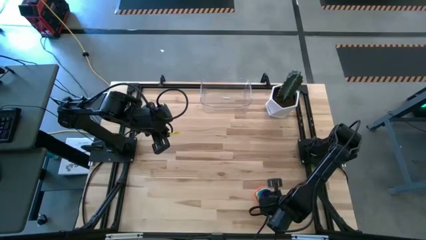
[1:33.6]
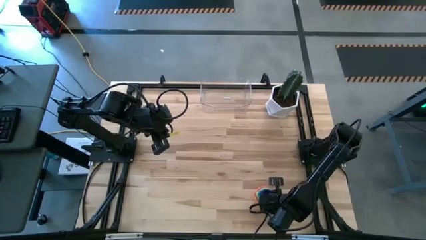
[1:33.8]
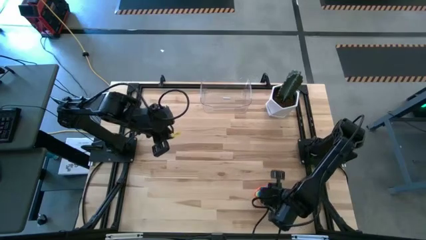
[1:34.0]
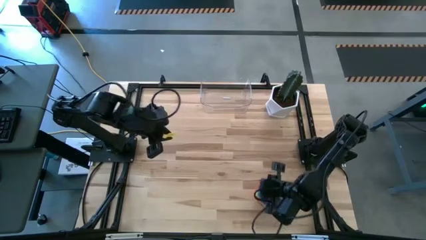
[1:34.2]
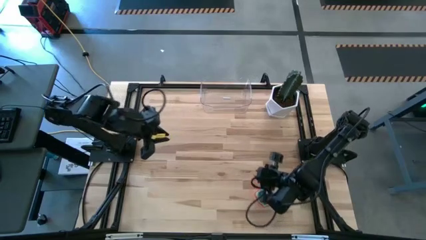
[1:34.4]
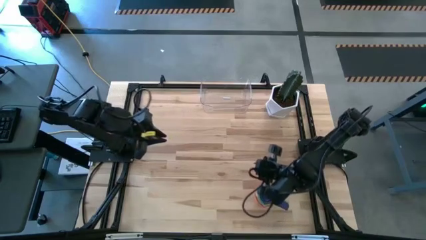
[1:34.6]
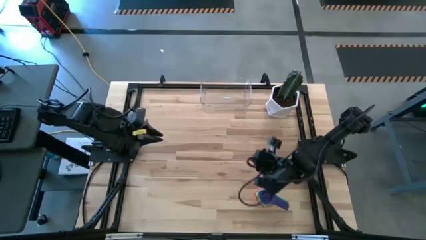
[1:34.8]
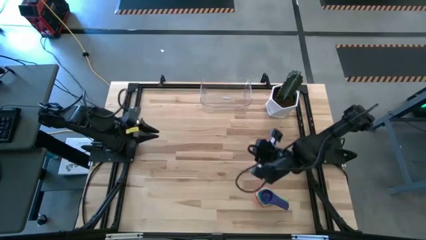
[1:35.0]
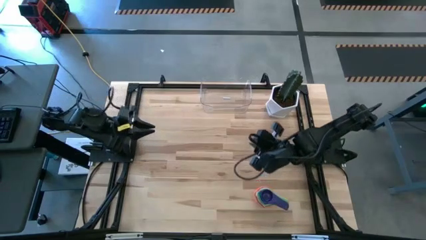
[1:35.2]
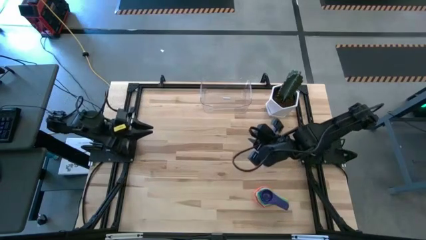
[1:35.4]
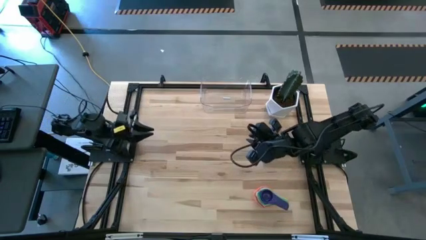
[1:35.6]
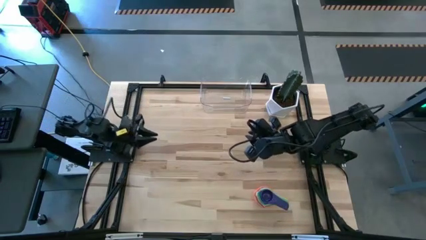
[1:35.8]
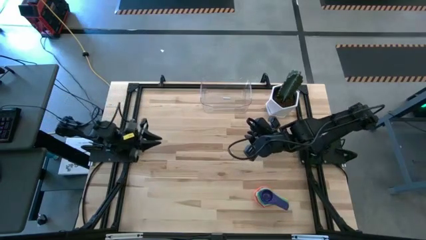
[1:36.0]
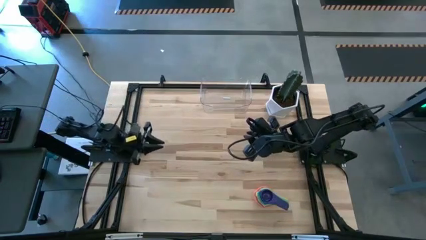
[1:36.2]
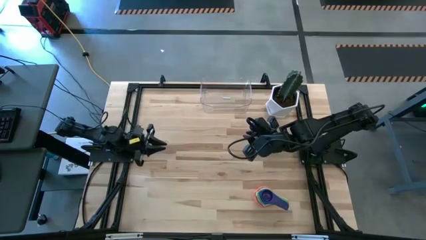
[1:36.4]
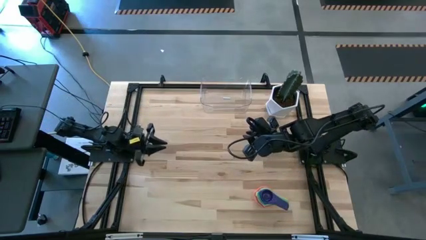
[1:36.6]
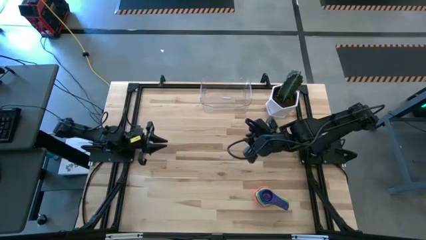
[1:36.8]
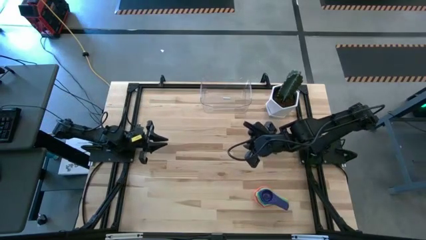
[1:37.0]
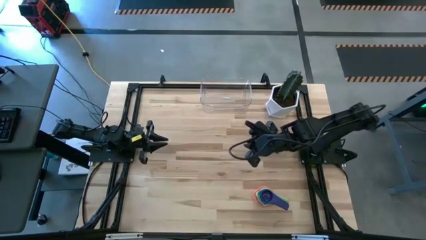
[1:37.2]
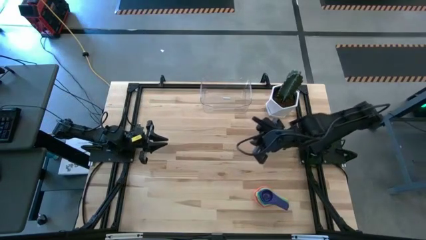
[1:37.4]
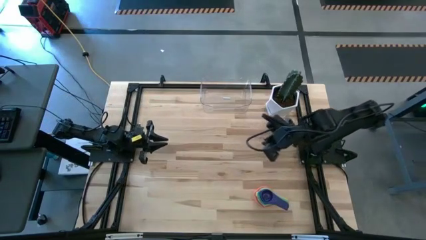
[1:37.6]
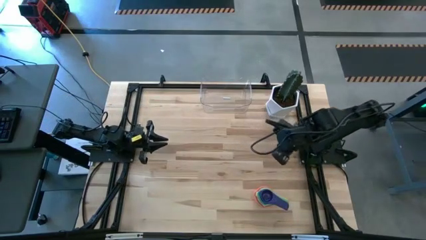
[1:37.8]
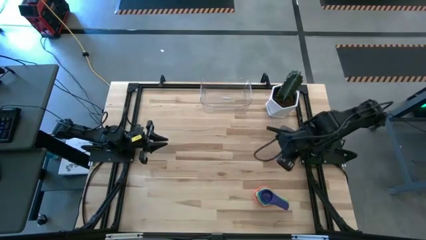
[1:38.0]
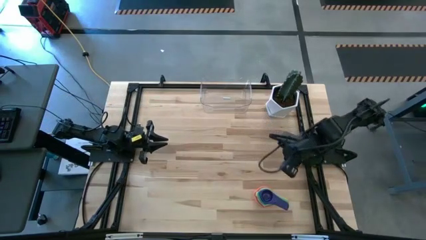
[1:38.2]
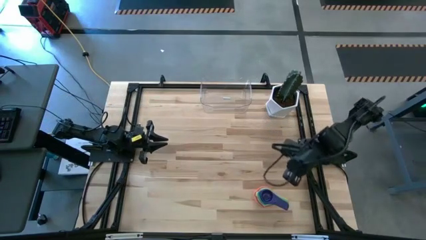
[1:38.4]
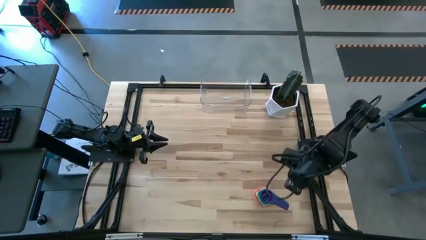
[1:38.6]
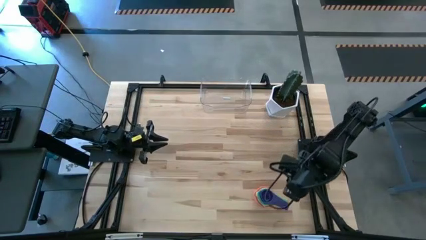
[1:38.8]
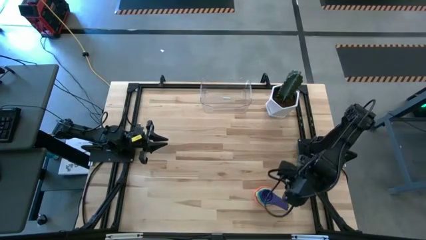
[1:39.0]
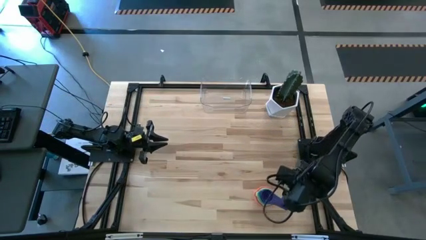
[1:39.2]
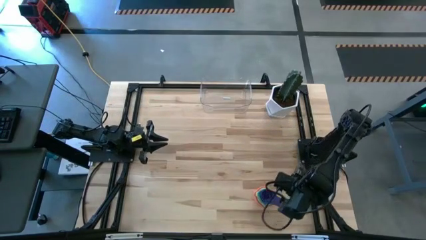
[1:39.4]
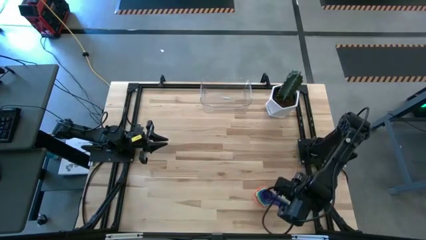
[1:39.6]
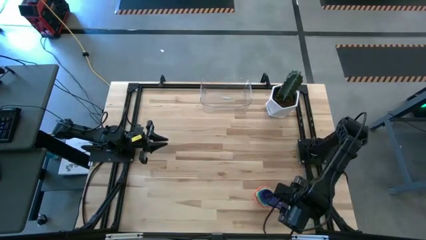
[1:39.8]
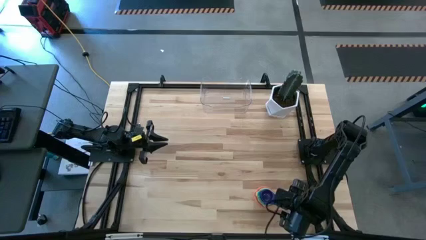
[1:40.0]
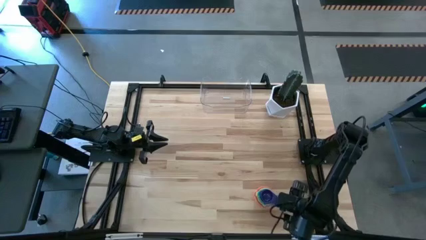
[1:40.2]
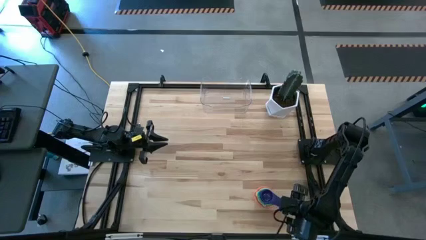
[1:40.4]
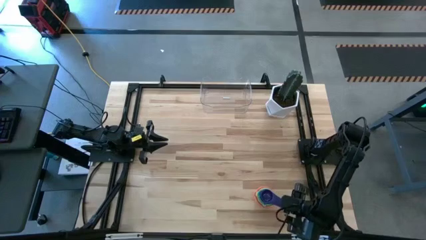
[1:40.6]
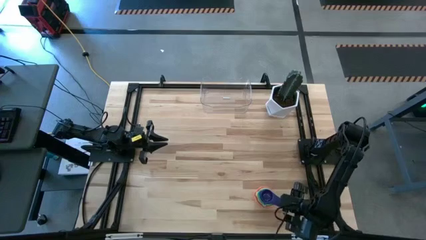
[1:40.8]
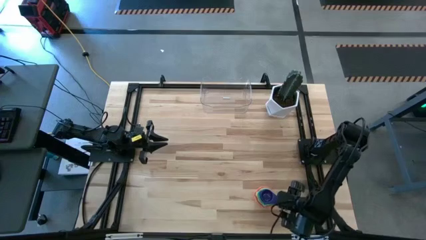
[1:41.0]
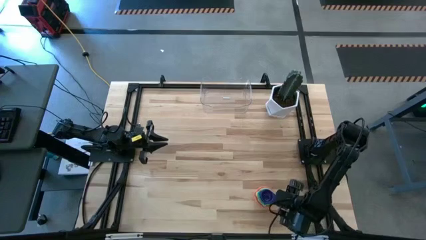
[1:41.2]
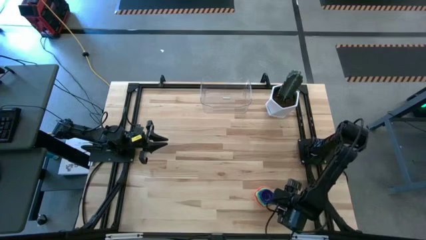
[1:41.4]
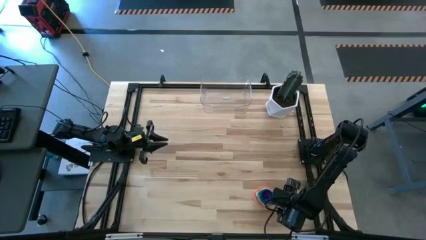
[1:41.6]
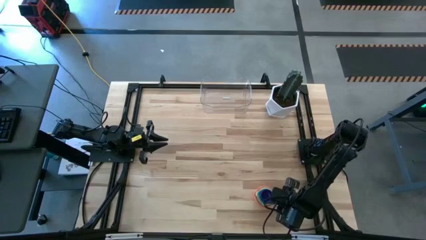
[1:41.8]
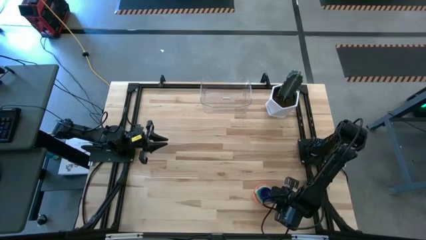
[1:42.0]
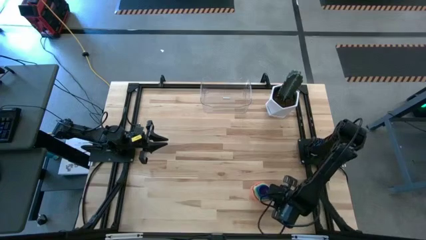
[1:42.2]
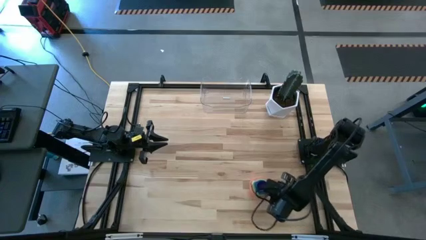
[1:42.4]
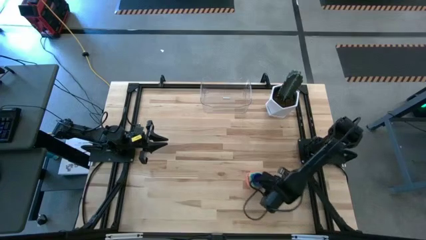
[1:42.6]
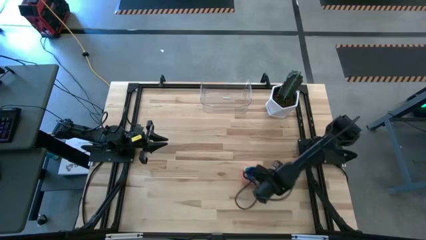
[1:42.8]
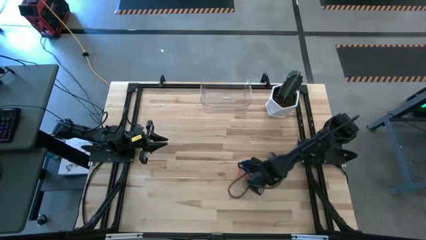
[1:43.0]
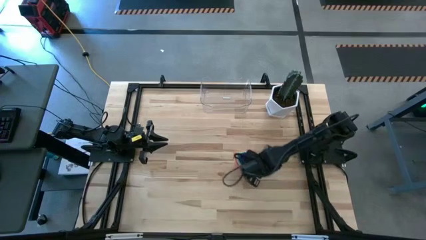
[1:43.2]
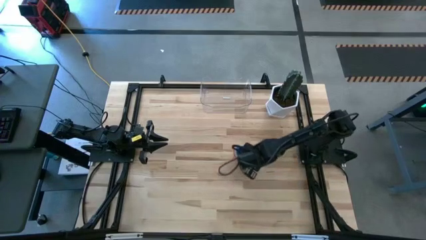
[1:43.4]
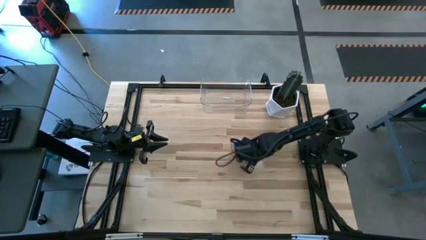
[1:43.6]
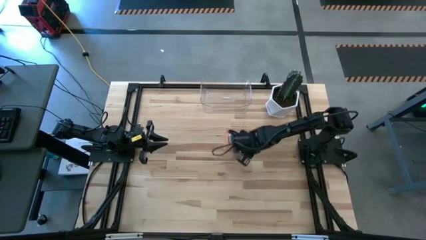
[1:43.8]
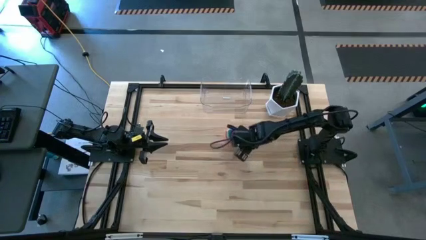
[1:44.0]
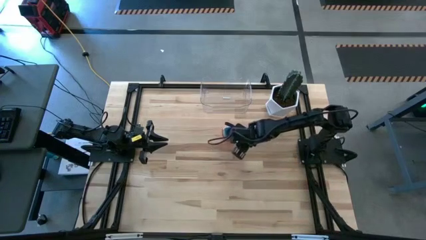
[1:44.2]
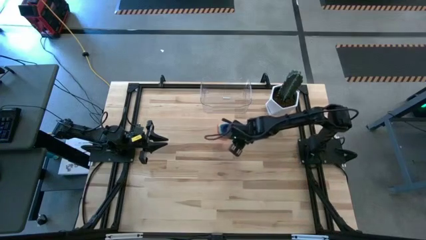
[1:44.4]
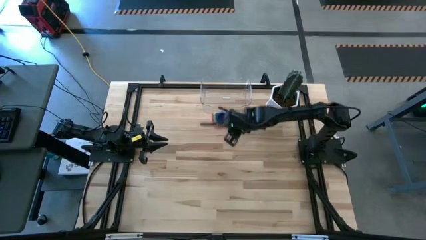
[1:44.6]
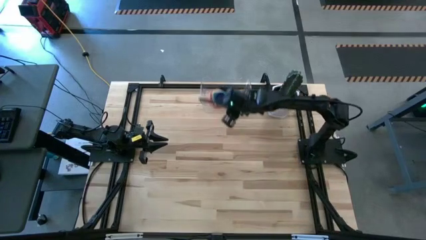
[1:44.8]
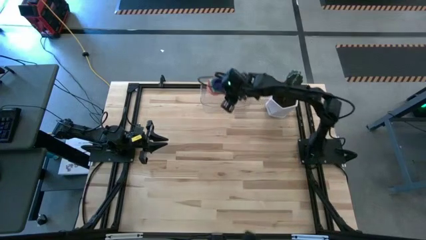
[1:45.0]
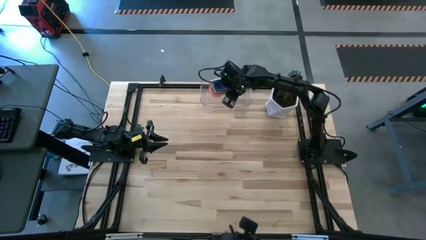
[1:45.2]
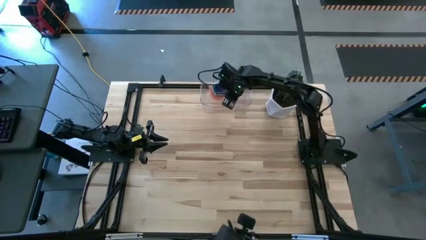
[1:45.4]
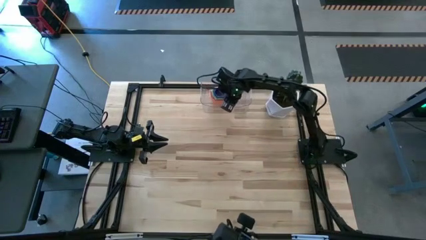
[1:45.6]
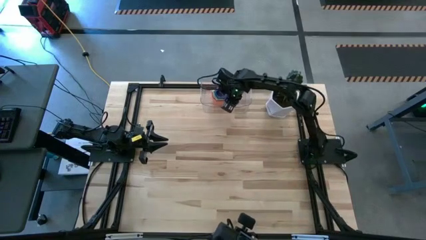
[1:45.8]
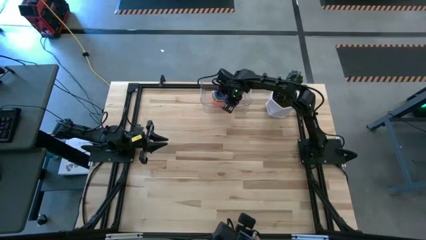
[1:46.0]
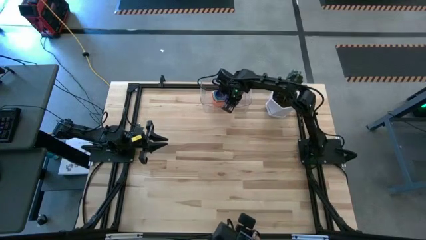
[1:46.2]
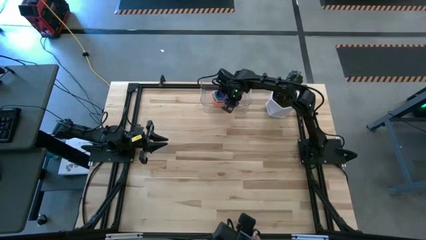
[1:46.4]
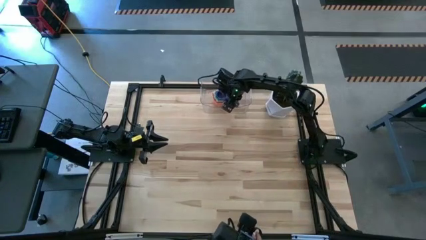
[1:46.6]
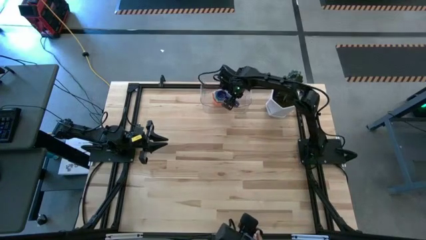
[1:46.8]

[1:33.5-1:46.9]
Task: Nest measuring cups in basket
Put the nested measuring cups into the transparent bin

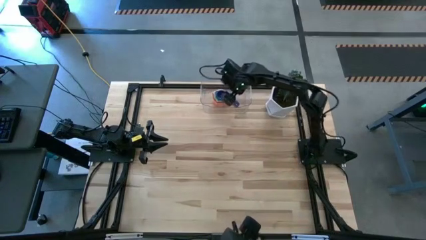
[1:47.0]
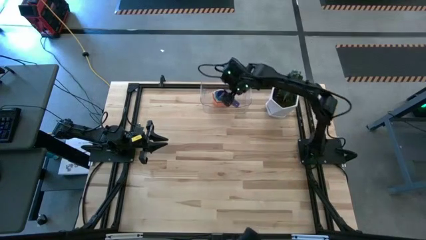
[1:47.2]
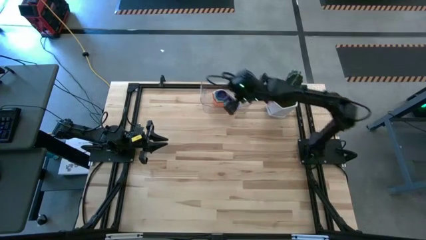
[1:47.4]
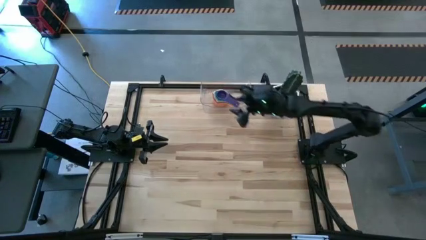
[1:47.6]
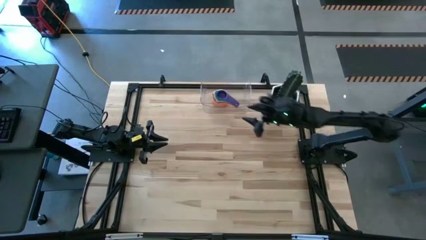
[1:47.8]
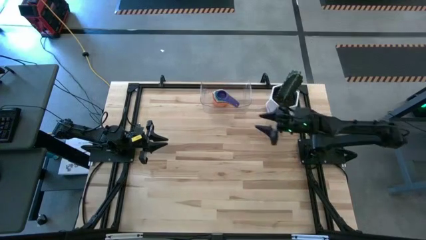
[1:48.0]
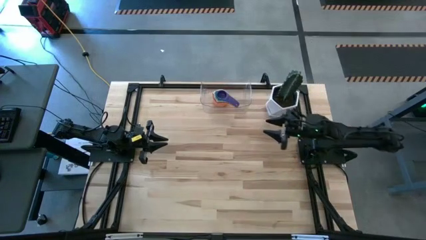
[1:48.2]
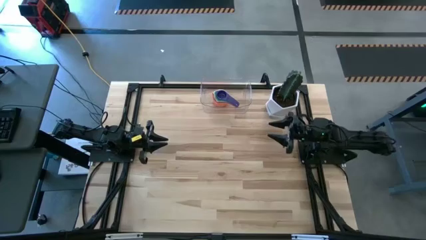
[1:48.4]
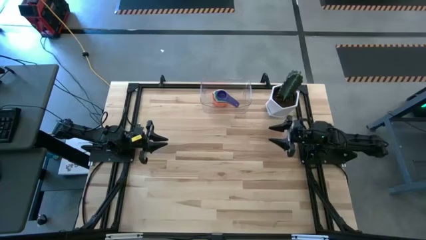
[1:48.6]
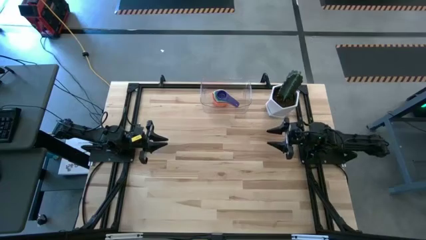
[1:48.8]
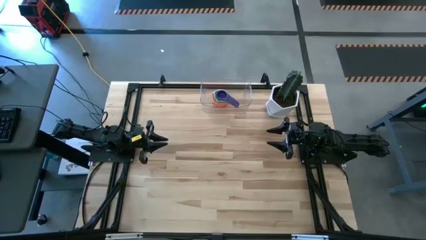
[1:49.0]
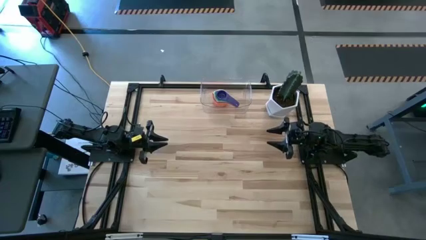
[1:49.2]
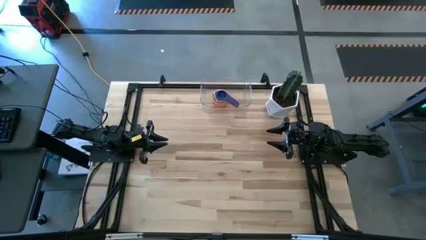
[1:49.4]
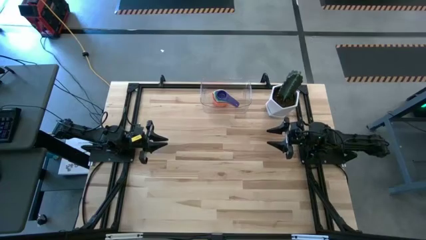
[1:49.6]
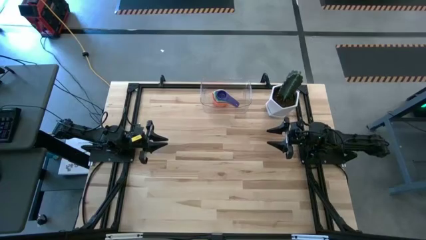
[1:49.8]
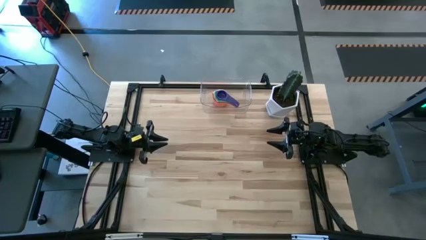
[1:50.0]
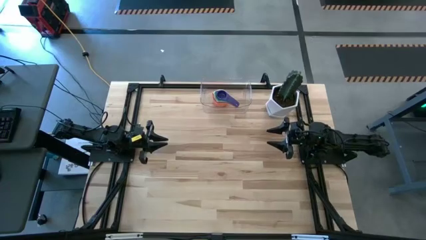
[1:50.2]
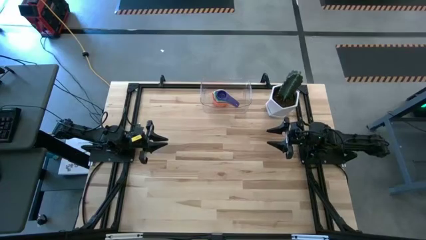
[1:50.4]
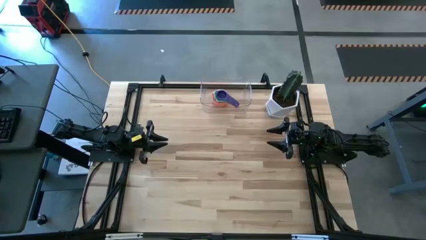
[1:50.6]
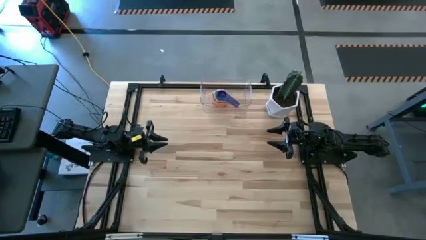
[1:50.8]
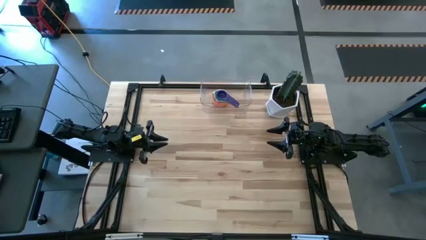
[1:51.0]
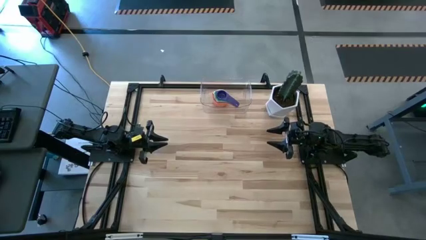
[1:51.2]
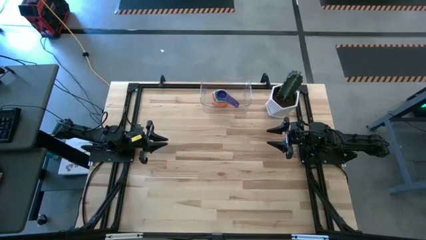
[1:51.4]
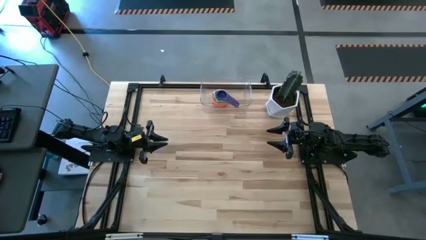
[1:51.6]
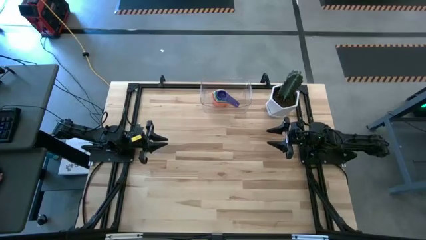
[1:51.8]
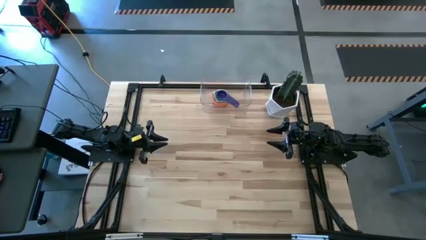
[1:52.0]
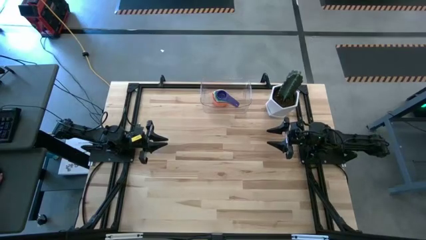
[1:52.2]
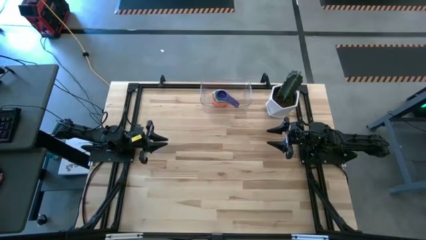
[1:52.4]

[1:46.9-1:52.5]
Return to Home Position
